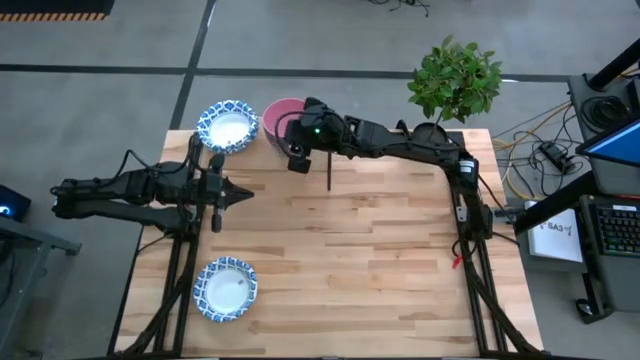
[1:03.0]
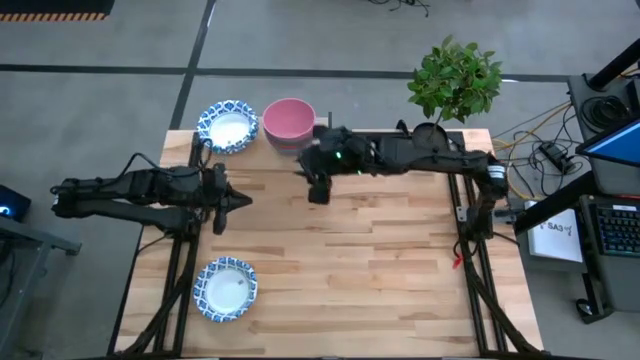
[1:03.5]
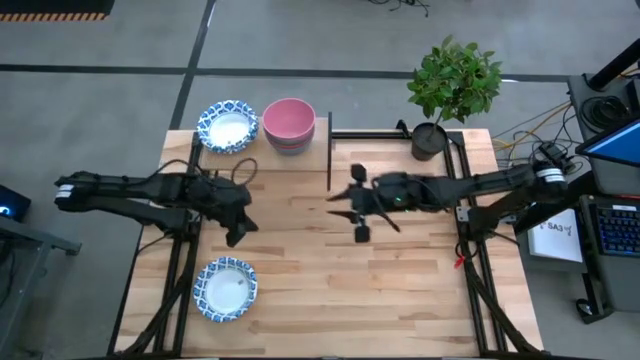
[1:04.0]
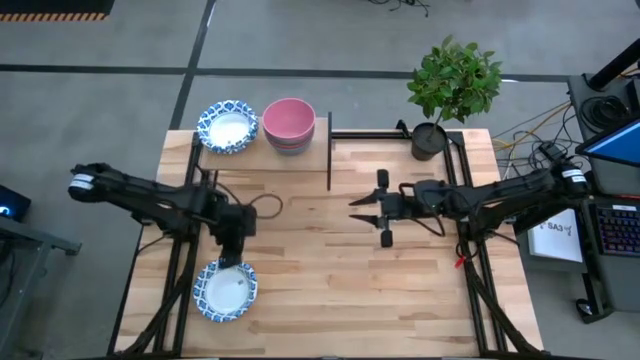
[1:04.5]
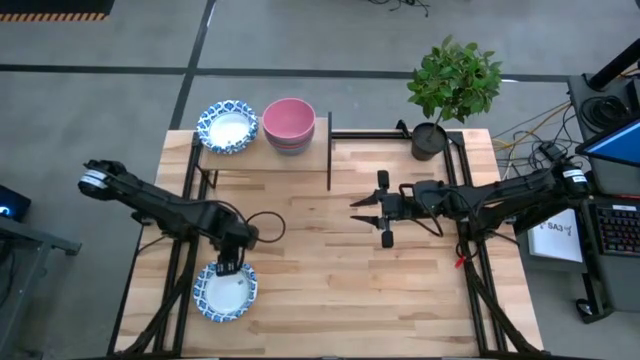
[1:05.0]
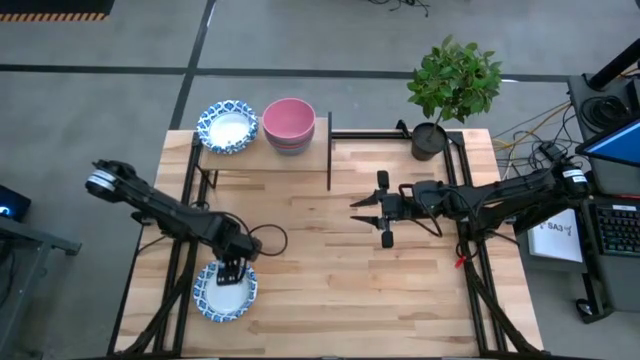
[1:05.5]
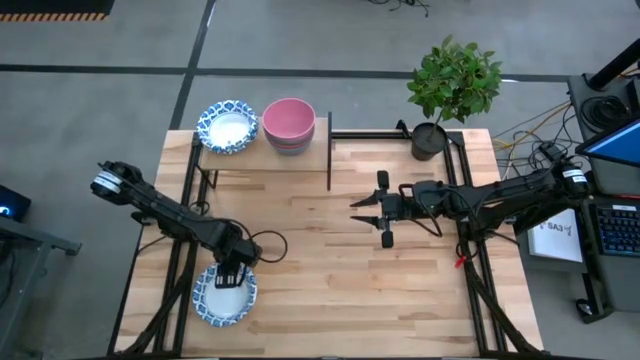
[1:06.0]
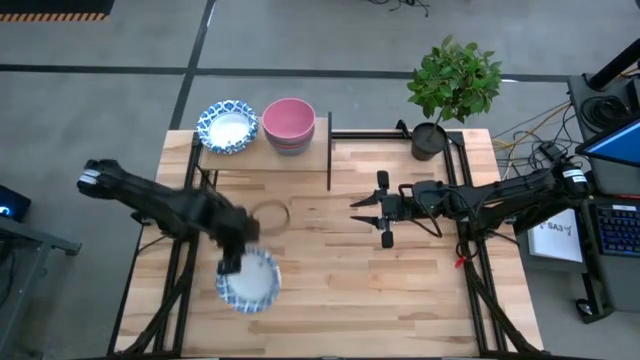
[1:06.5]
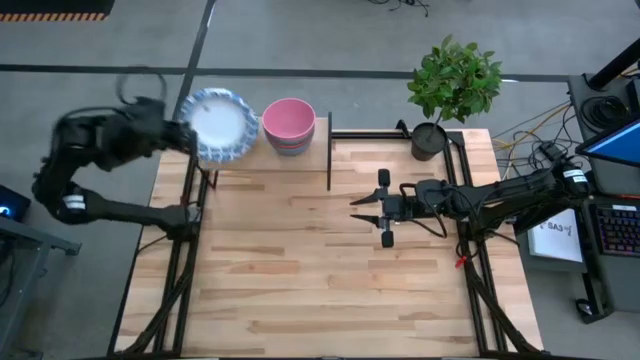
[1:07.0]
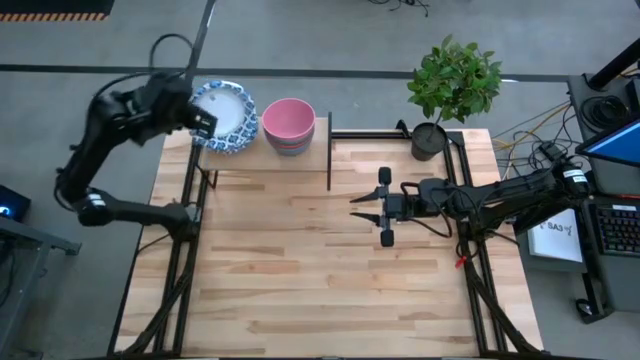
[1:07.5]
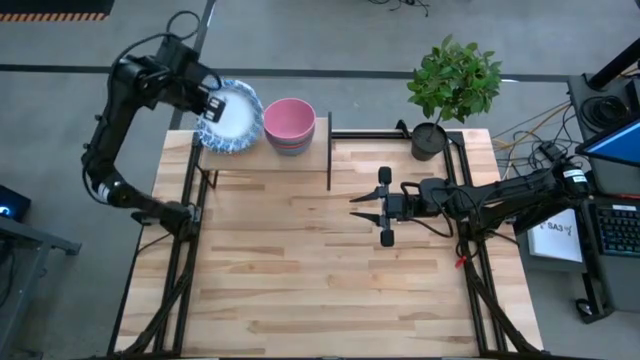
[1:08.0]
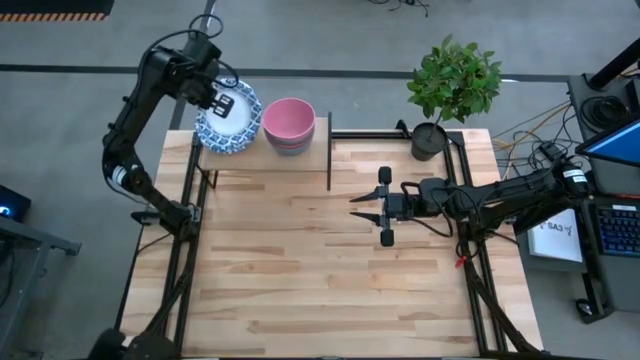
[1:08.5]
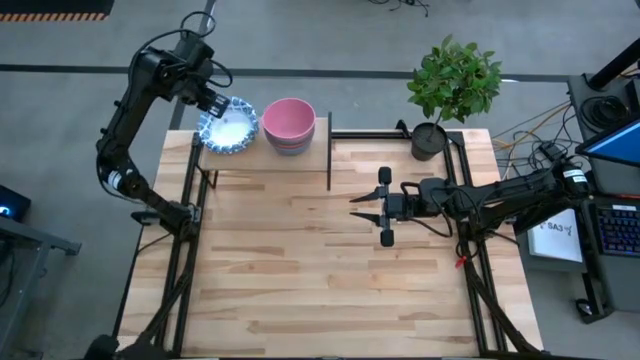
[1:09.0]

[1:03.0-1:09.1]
Task: Place and stack bowls onto a shelf
Stack the white and blue bowl on top of the shelf

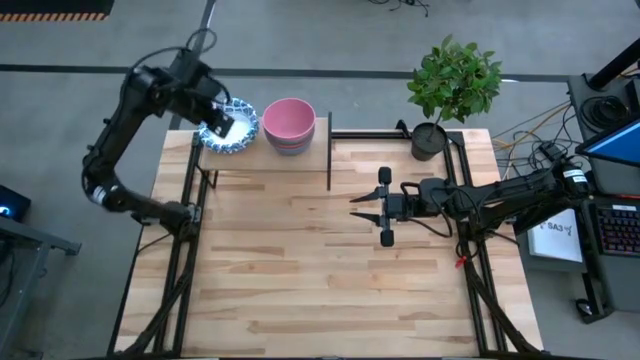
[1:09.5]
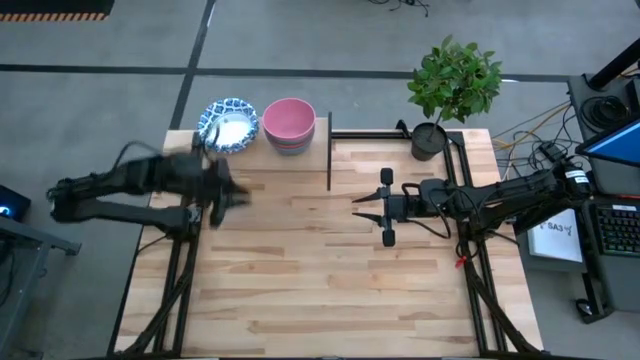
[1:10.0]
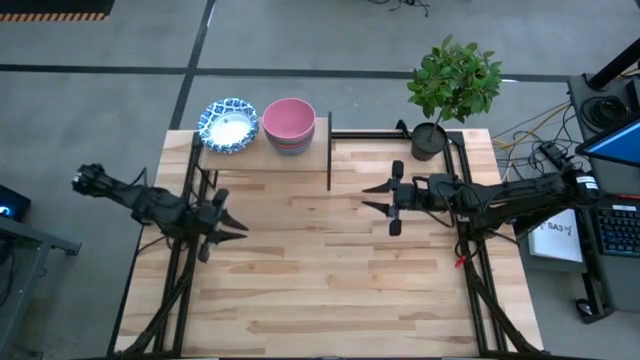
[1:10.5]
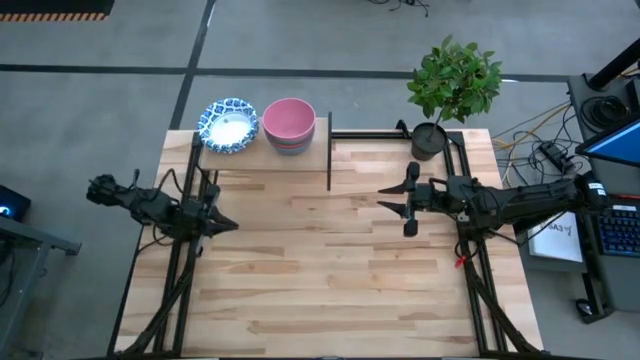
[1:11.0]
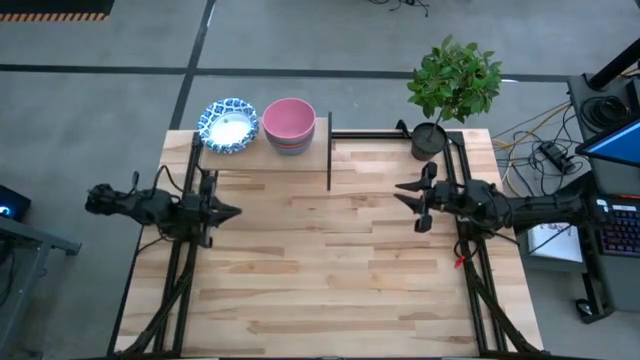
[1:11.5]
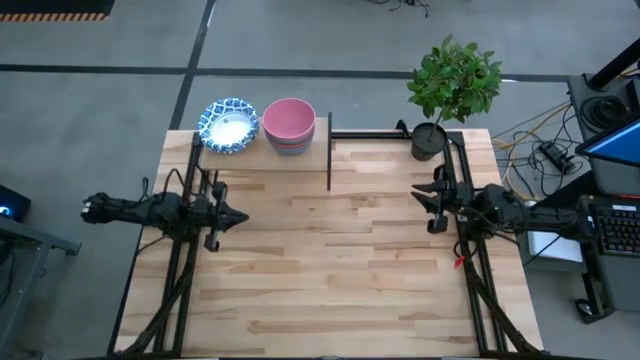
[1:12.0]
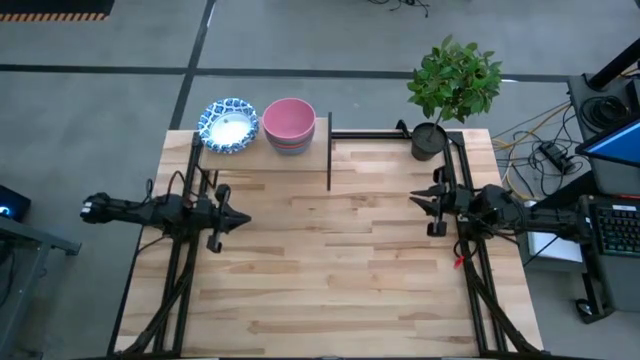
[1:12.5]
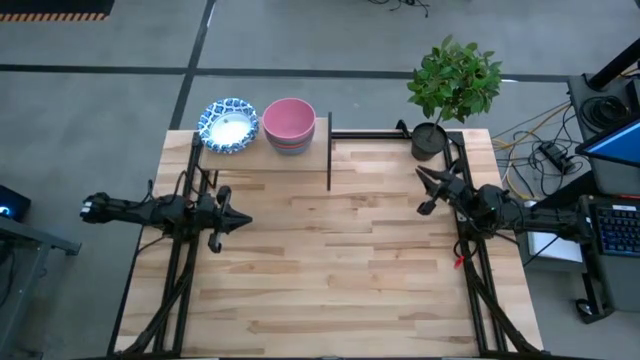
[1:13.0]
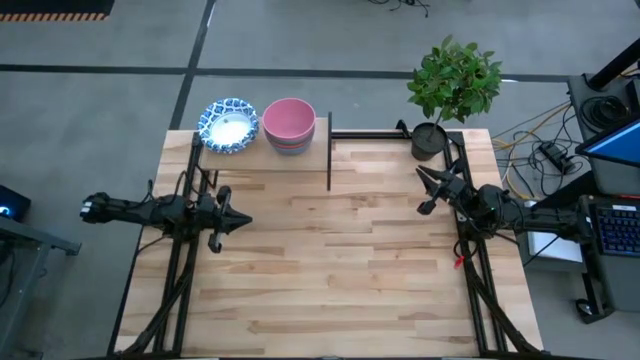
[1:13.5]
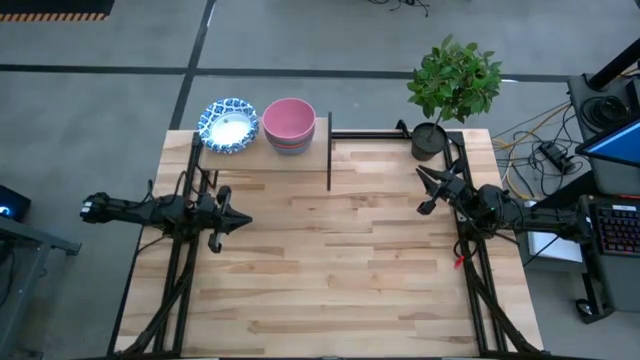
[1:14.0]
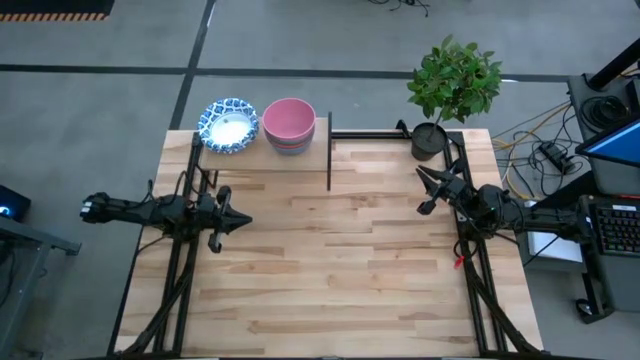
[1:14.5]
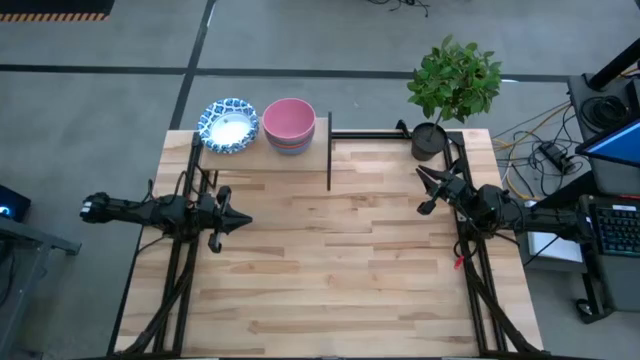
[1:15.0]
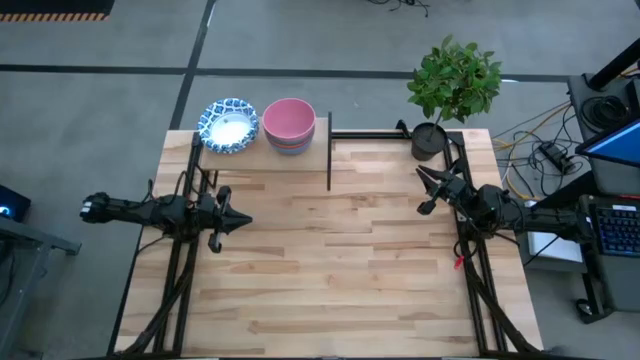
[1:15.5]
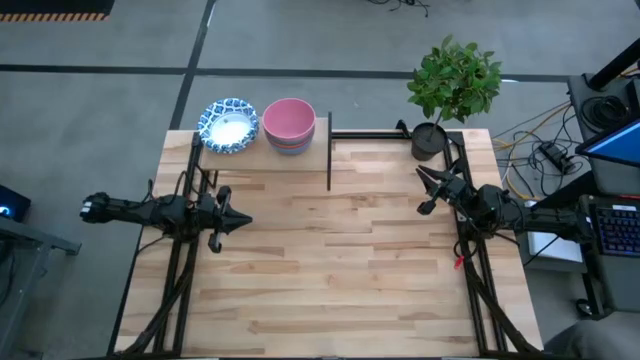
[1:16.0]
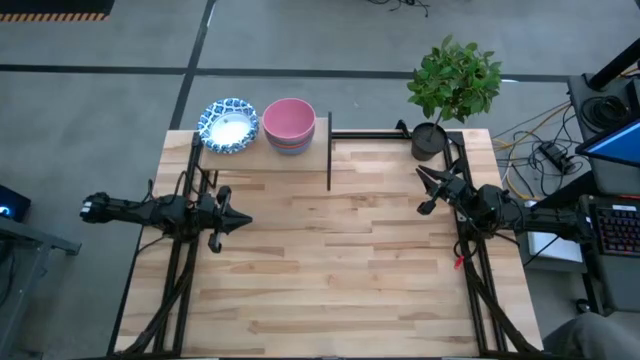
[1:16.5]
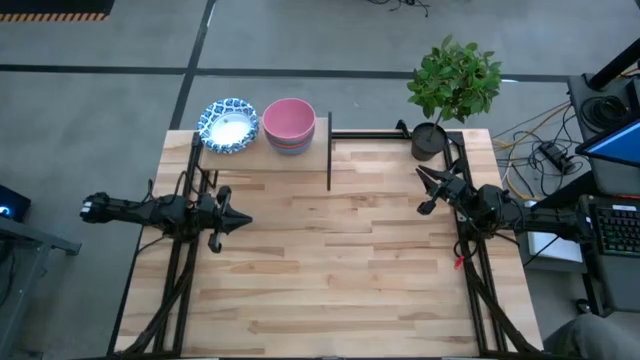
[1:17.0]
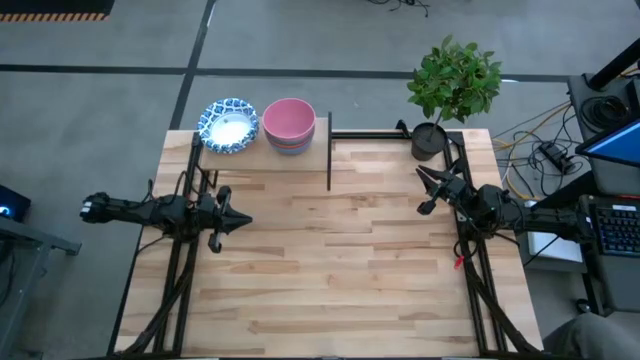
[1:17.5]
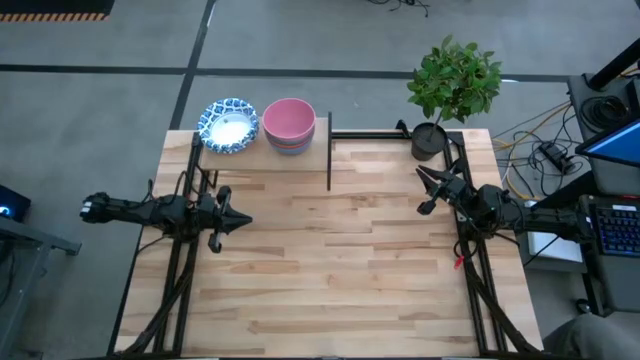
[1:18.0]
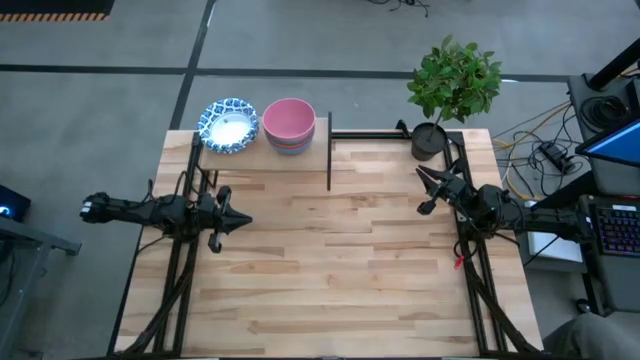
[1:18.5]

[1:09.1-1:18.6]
Return to Home Position

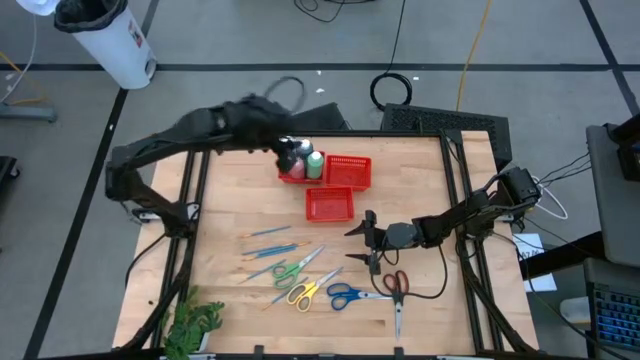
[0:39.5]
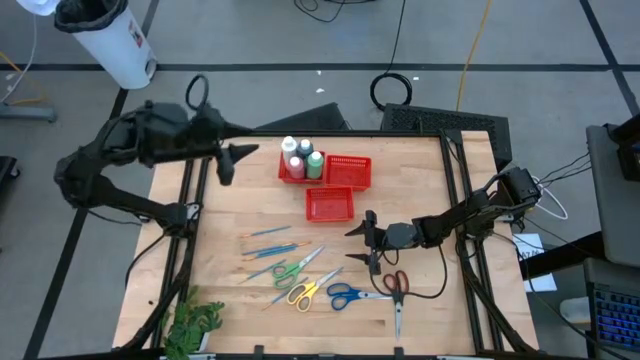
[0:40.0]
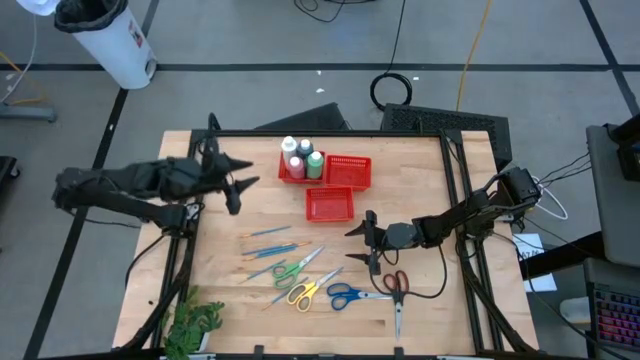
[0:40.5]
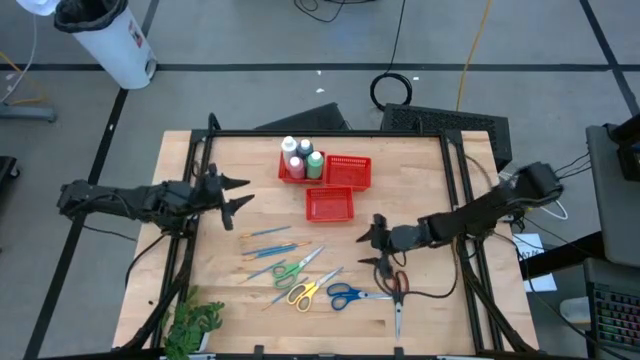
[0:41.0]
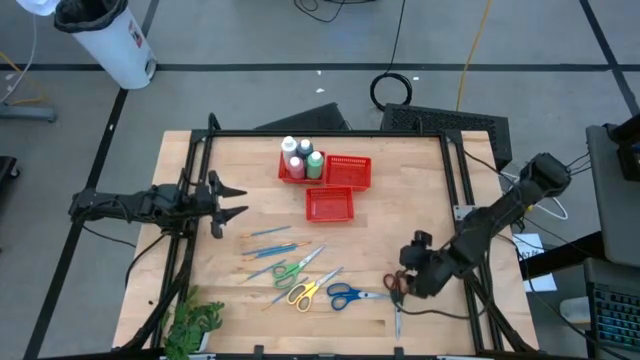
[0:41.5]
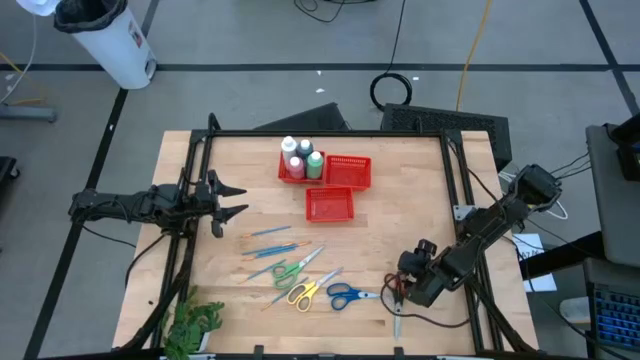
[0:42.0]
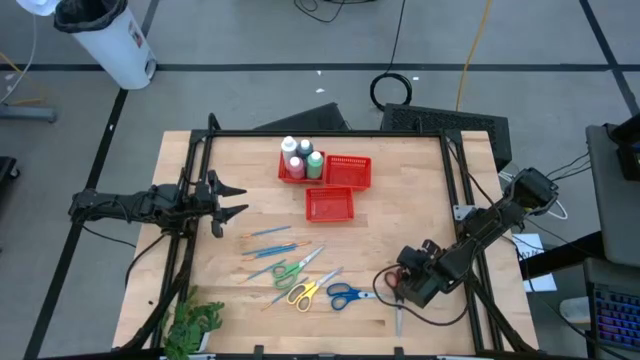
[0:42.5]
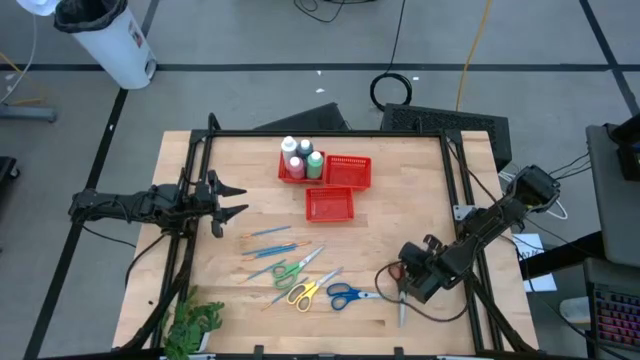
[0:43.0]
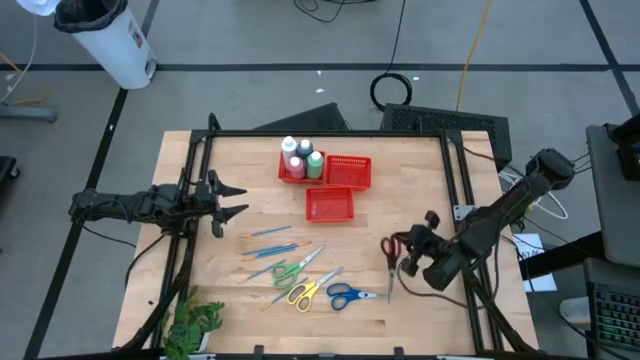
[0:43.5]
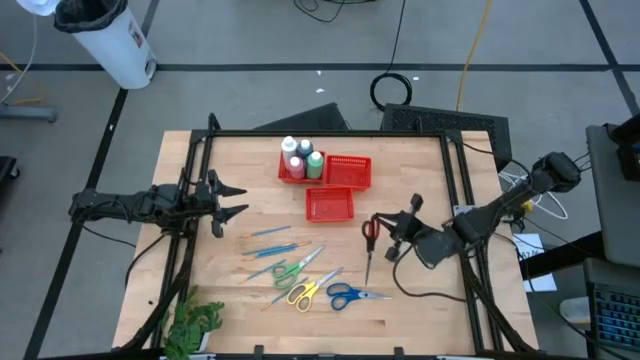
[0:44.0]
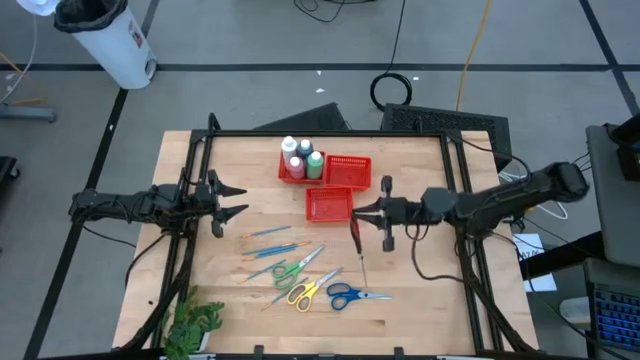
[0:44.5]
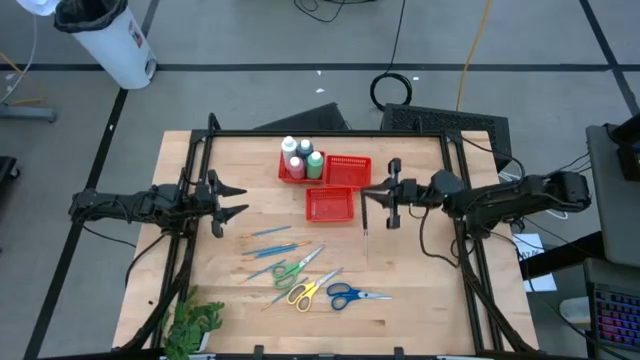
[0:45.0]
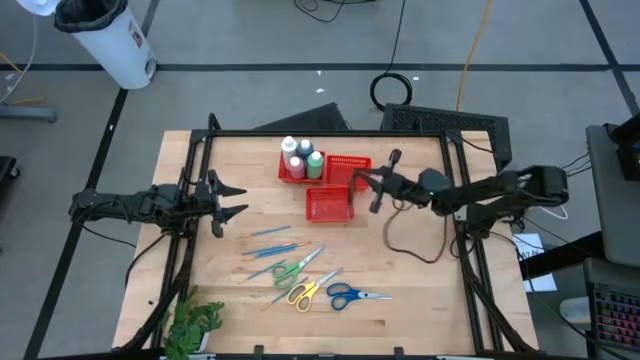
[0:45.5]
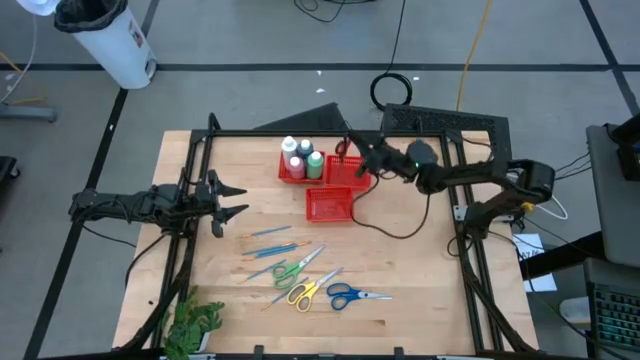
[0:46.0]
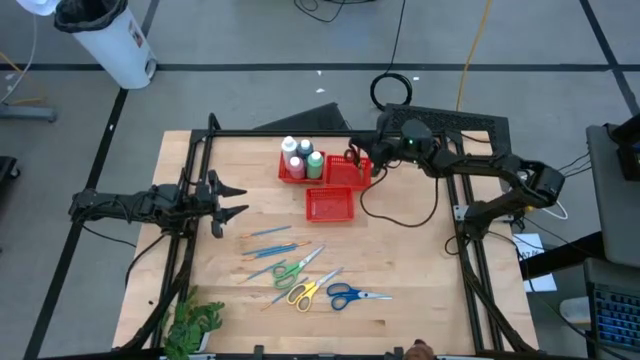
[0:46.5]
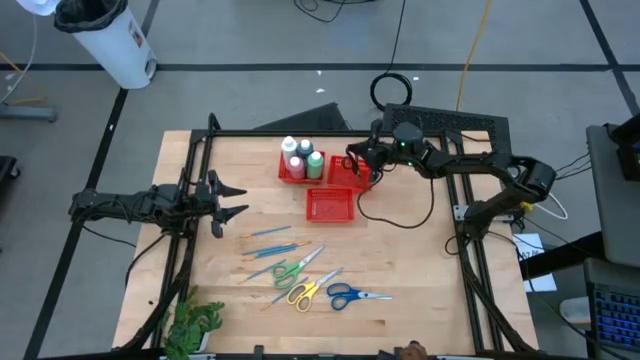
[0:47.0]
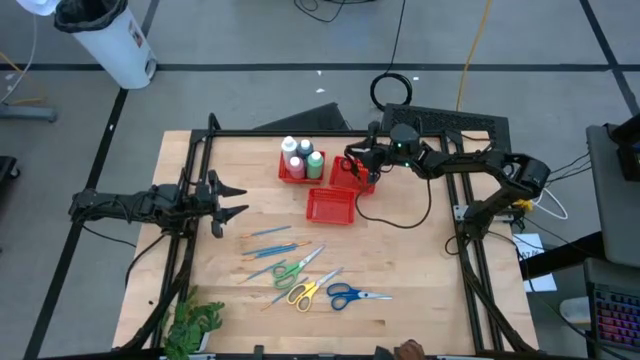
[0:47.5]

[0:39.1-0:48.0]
Task: Pick & Place Paint Supplies
Put the black scissors into the top right red bin
